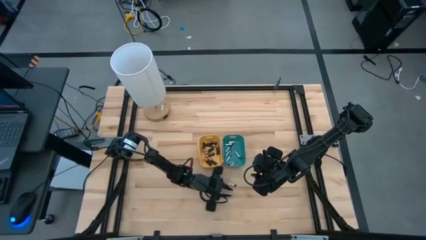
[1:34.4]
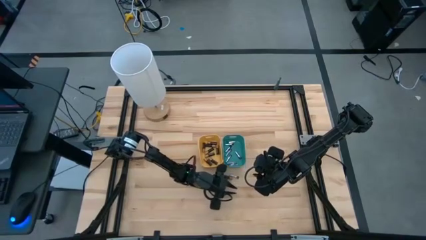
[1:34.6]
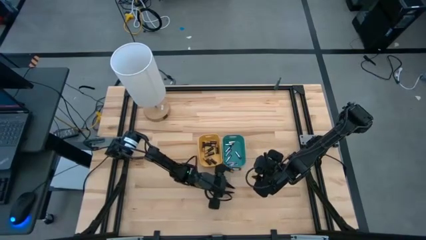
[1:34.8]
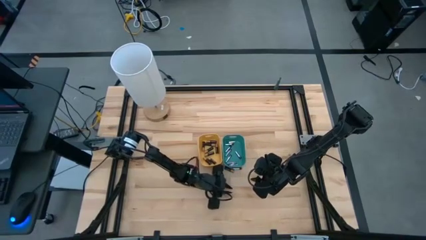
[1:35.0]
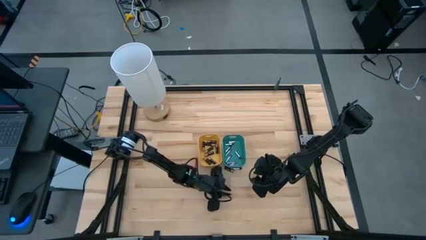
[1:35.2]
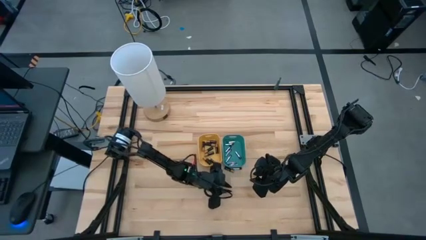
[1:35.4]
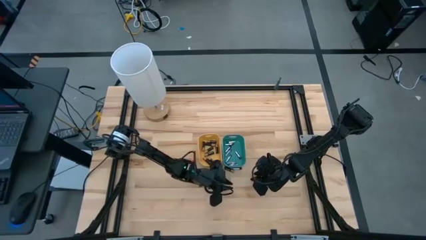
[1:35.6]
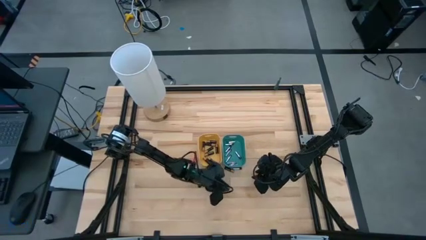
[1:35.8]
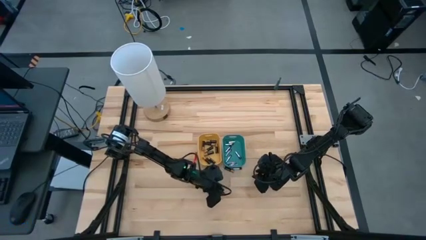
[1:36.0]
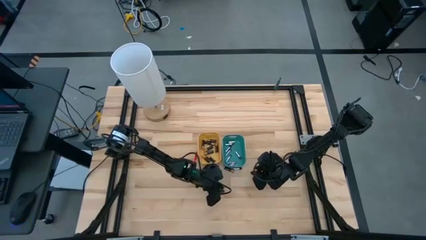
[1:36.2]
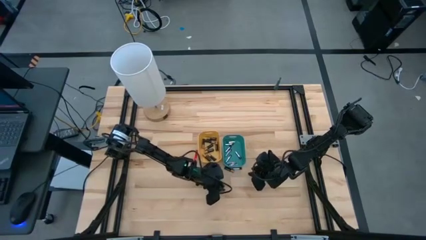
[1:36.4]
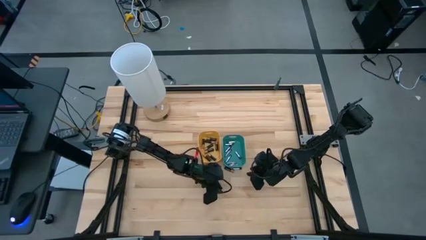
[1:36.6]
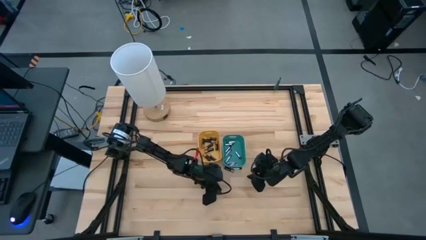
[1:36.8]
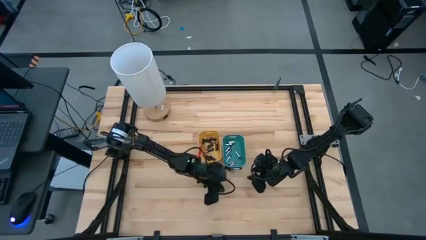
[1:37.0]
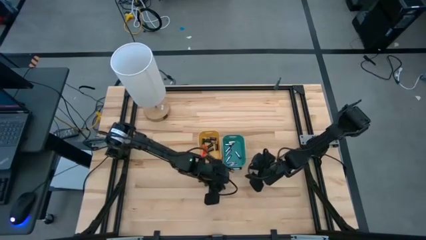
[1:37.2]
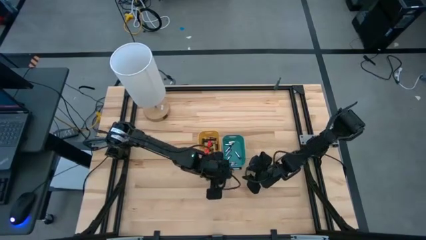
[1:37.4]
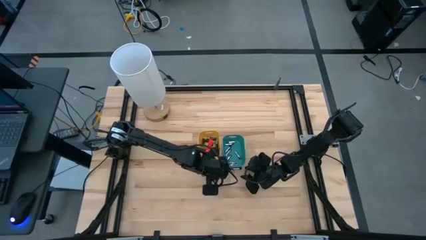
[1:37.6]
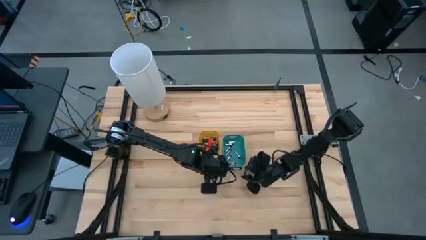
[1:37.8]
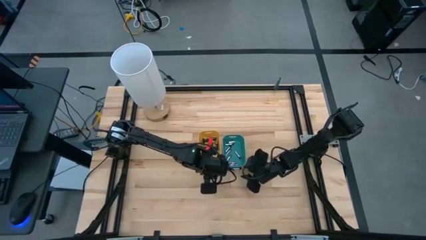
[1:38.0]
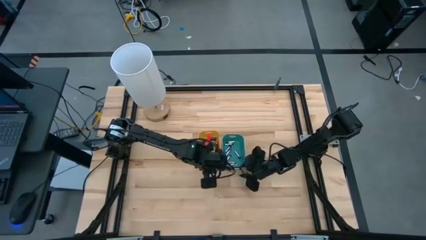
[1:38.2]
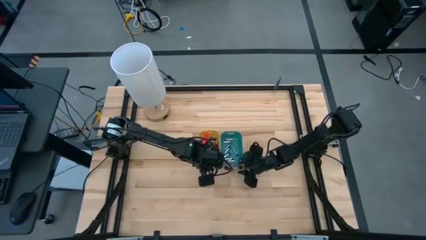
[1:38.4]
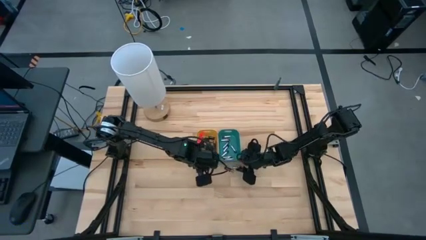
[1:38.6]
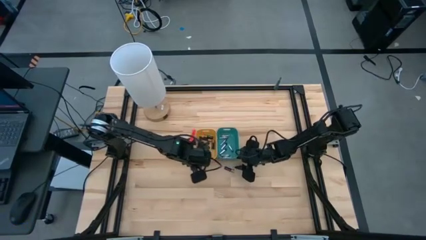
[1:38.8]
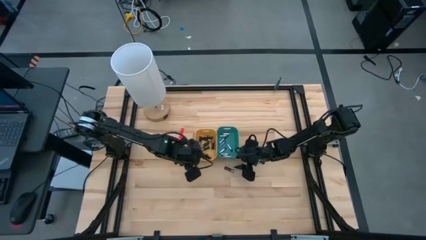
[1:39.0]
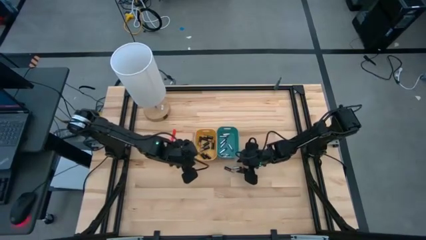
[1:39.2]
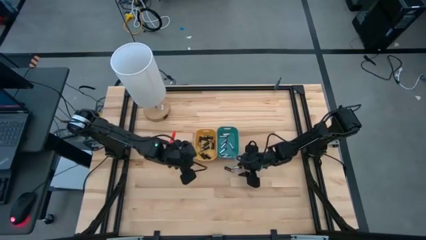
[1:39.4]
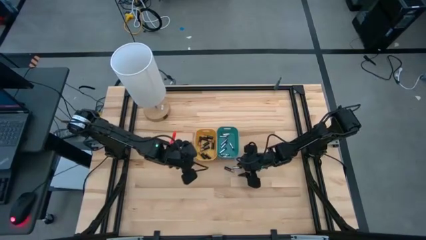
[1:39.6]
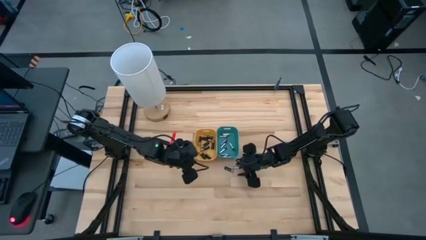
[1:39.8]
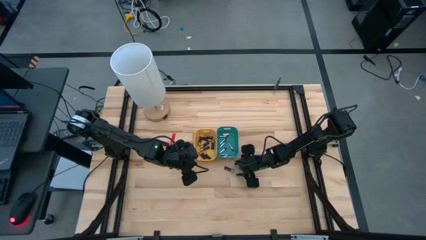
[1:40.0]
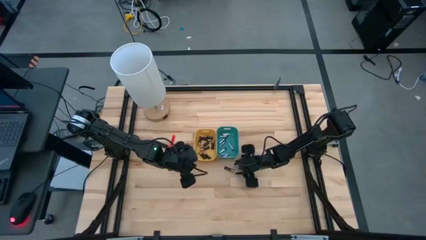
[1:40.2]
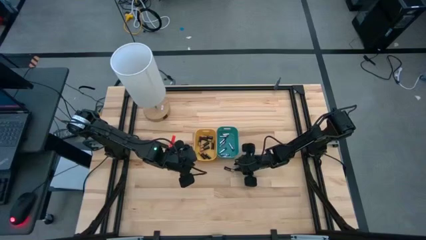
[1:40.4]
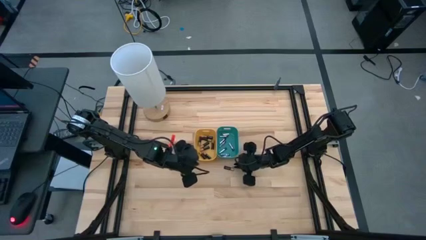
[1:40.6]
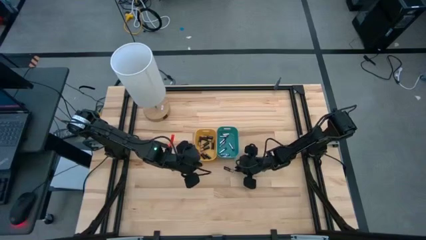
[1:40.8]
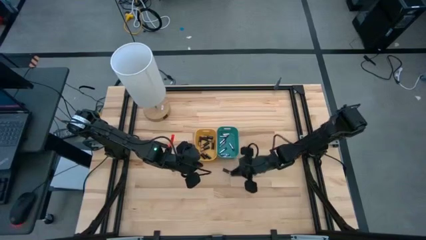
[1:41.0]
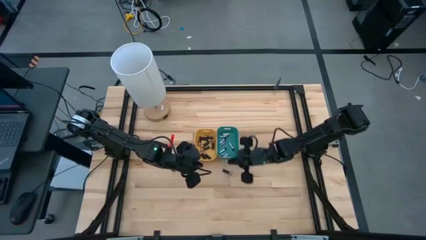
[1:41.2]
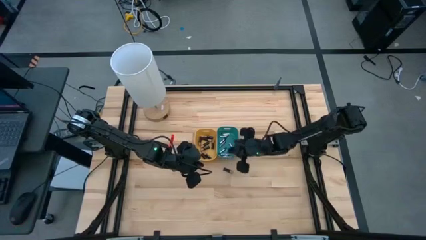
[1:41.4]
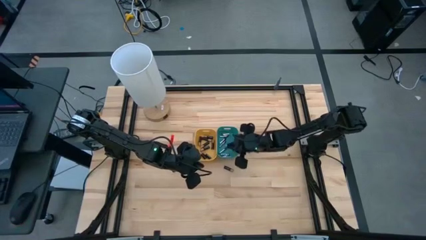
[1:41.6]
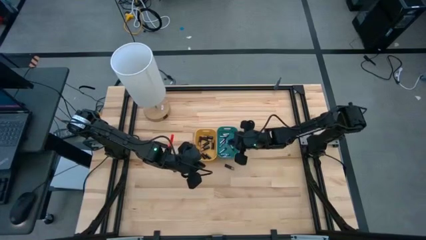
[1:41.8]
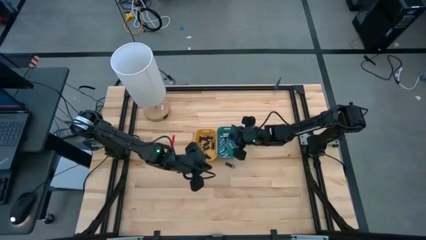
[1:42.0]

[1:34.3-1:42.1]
Task: Sort batteries
Put the silver battery into the blue bin

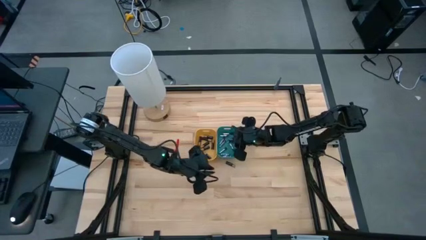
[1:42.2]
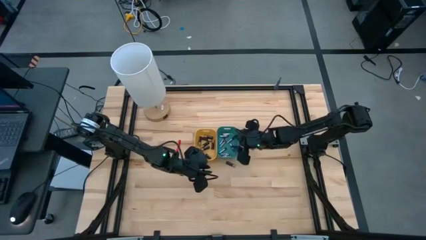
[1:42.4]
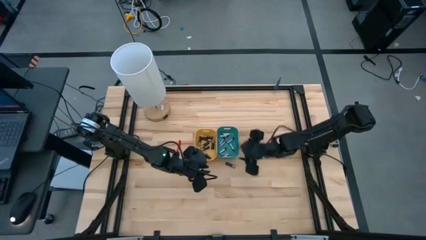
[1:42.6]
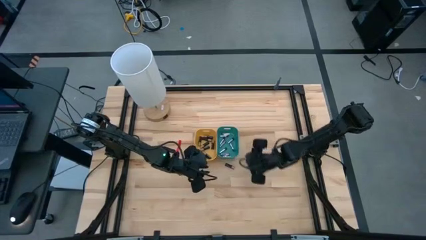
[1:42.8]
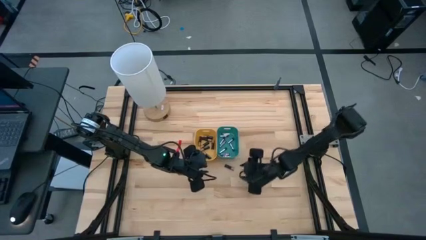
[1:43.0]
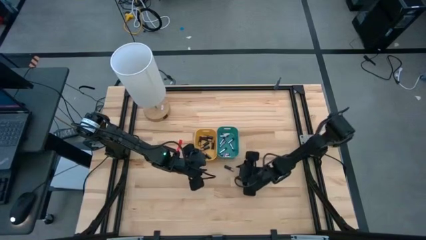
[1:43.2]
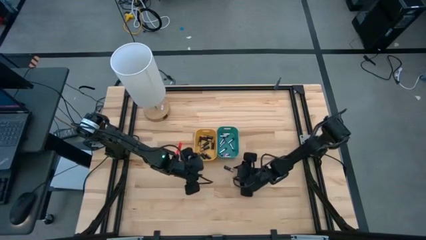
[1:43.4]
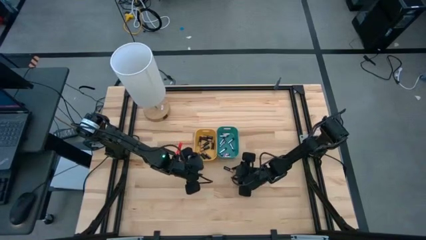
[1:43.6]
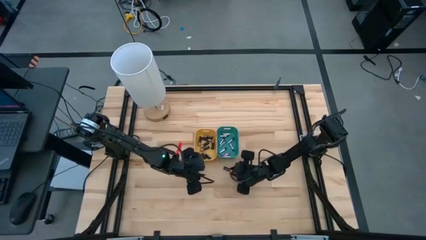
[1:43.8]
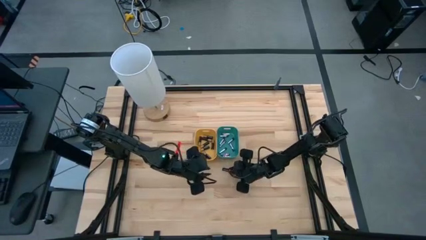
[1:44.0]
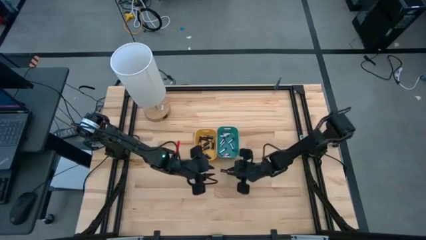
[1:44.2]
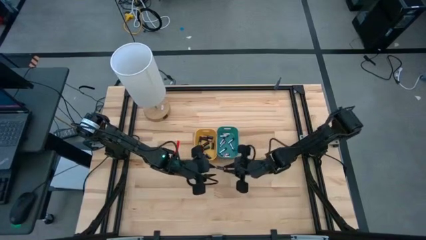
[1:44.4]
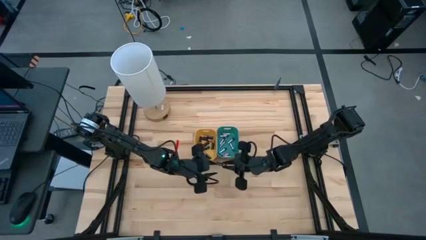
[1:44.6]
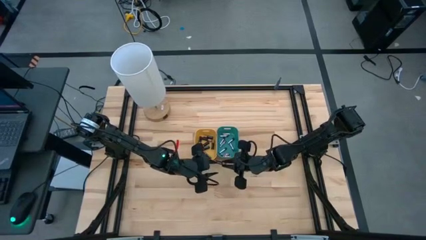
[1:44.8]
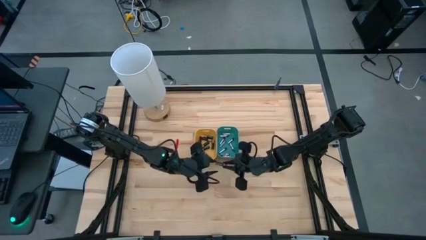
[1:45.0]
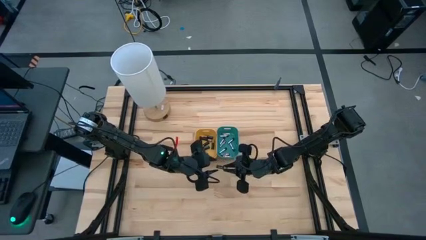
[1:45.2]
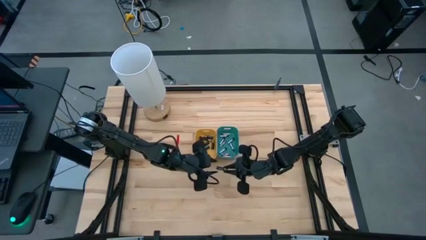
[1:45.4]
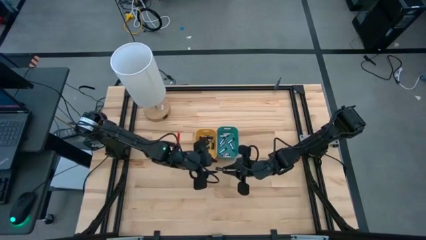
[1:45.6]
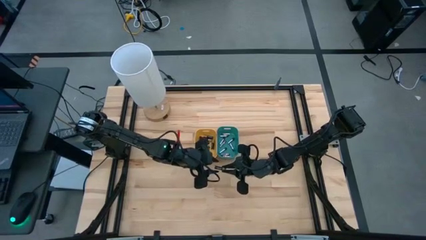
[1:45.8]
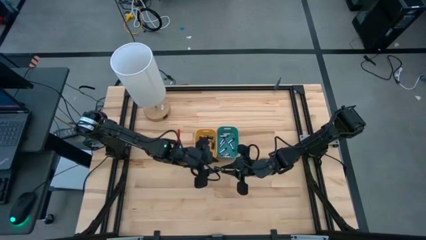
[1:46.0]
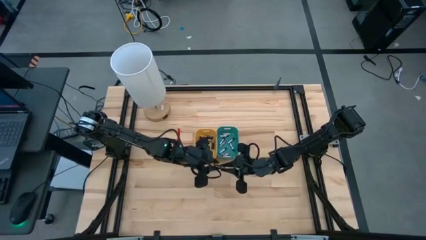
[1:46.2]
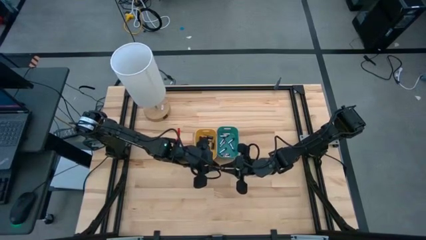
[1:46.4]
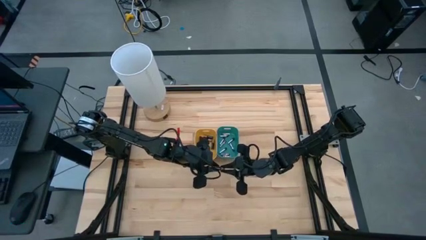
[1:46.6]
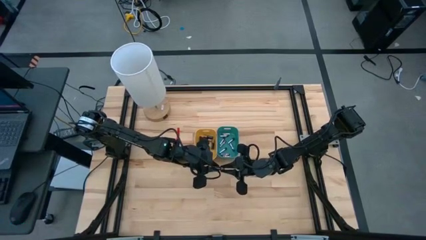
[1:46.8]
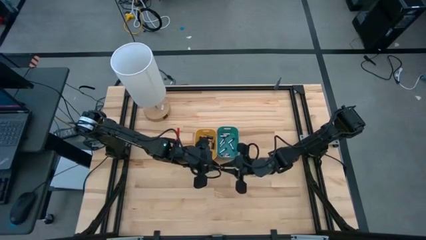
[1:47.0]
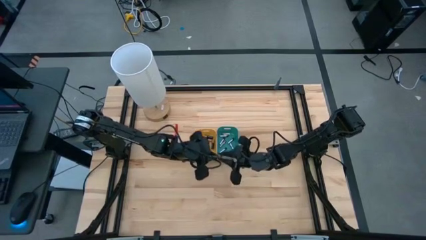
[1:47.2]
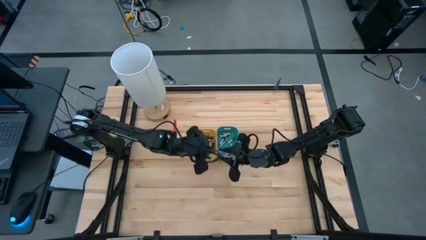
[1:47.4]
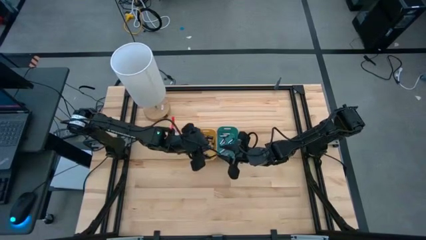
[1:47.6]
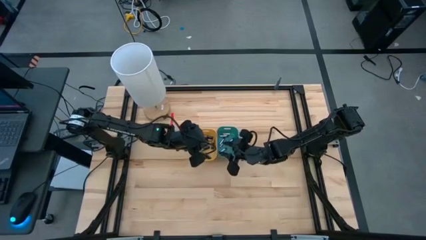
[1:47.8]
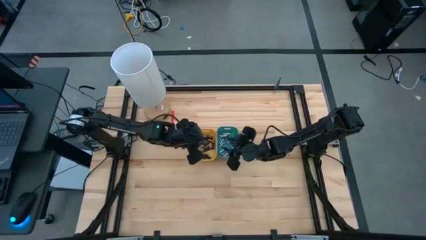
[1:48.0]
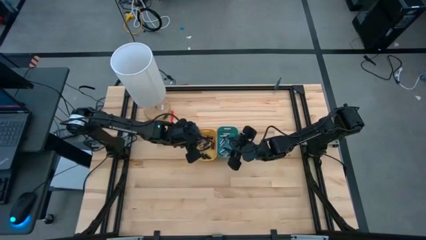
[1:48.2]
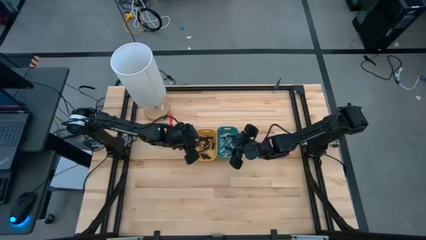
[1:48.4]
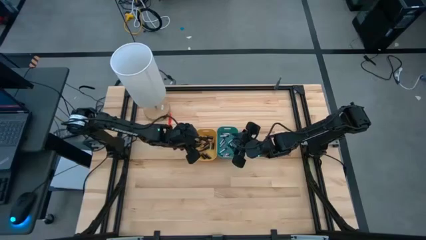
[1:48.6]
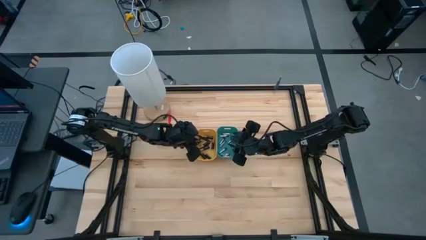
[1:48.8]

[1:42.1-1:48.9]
Put the black battery into the yellow bin

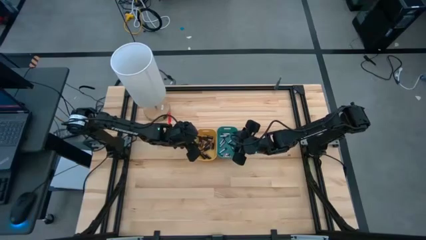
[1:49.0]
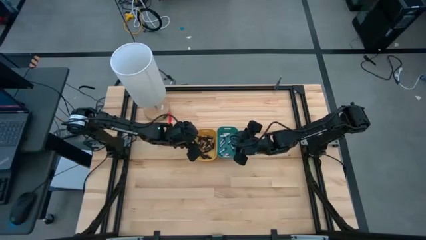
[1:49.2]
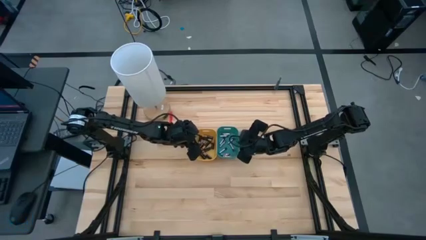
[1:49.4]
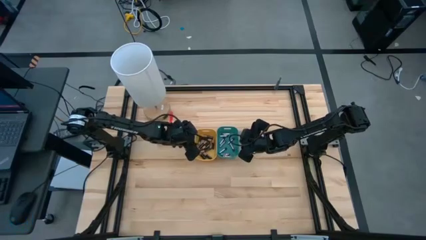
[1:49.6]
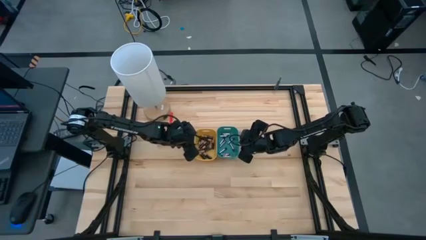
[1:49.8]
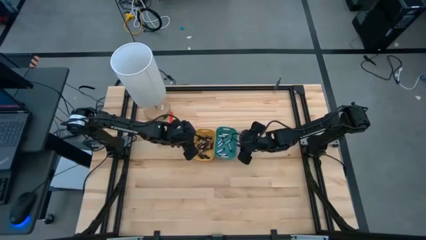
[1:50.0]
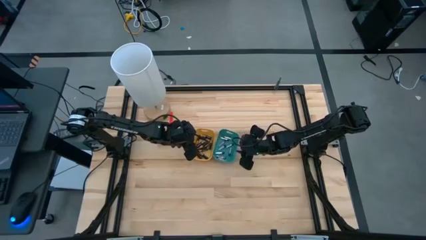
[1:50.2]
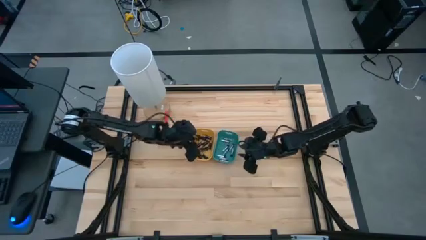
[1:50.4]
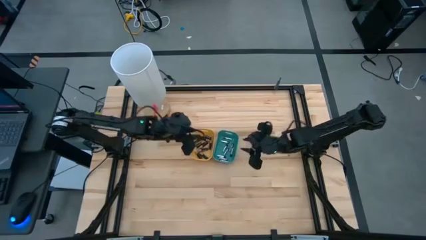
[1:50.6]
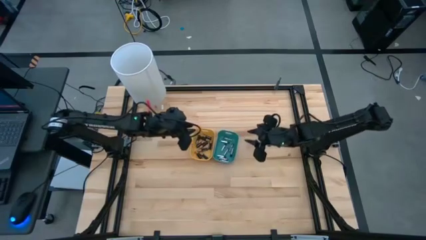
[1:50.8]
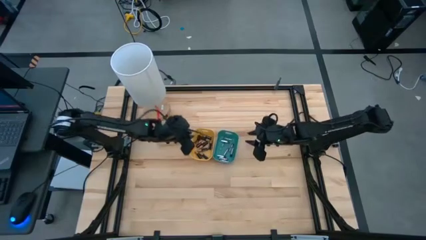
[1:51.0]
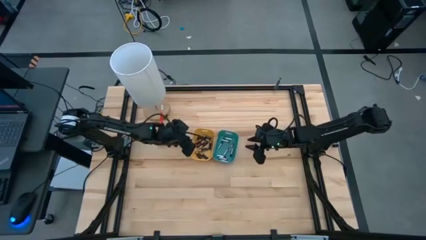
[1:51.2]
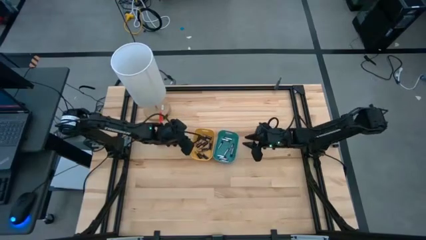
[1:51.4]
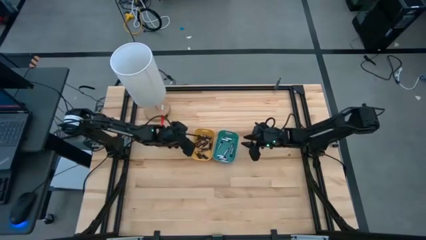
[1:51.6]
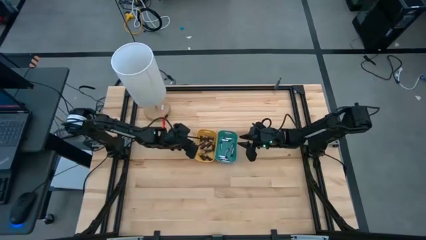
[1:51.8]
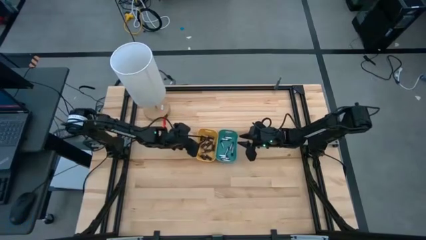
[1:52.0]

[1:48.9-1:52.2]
Adjust the bins on the table
